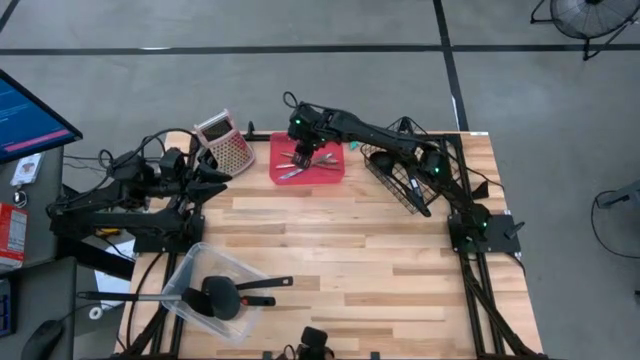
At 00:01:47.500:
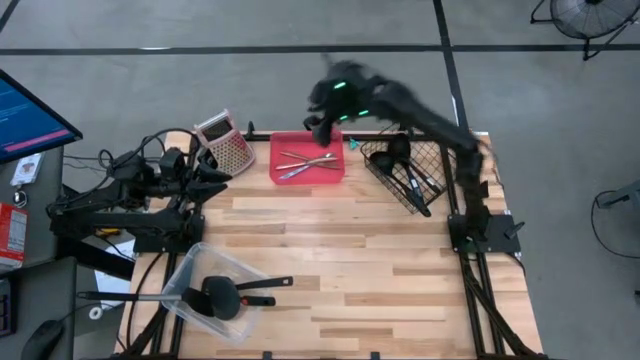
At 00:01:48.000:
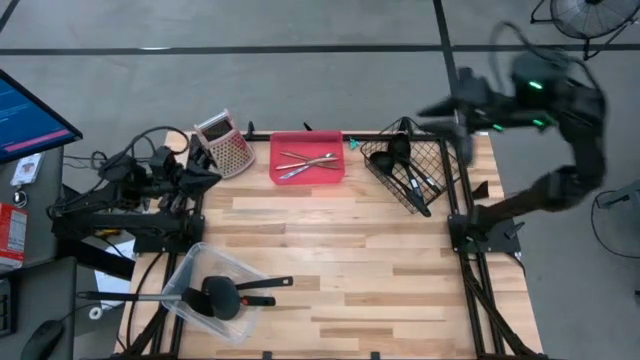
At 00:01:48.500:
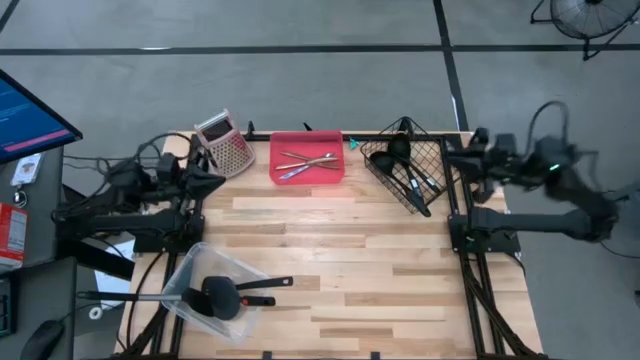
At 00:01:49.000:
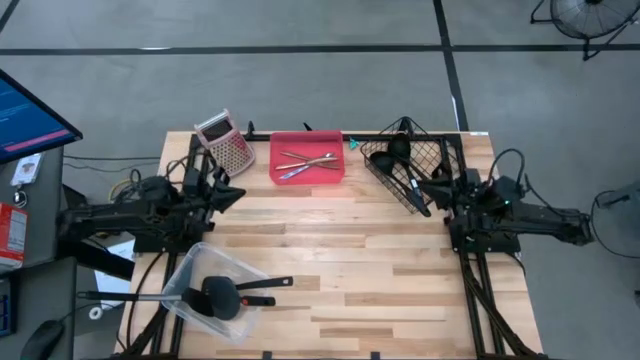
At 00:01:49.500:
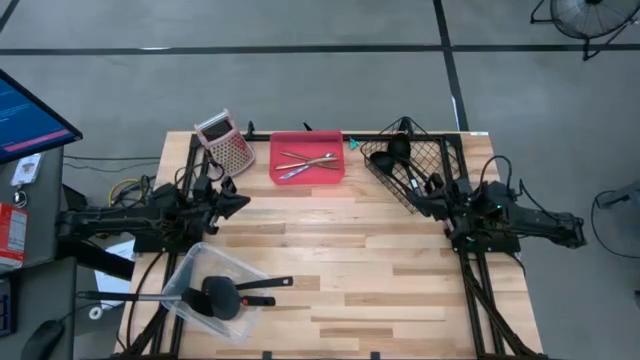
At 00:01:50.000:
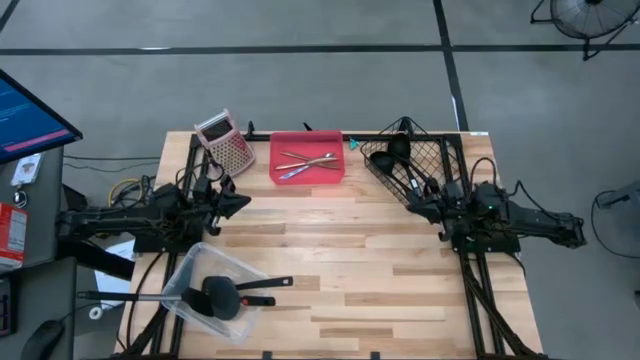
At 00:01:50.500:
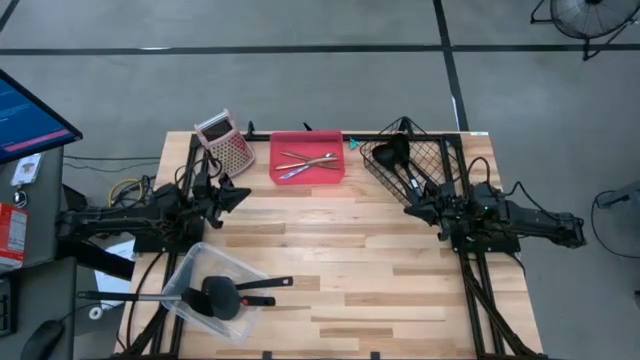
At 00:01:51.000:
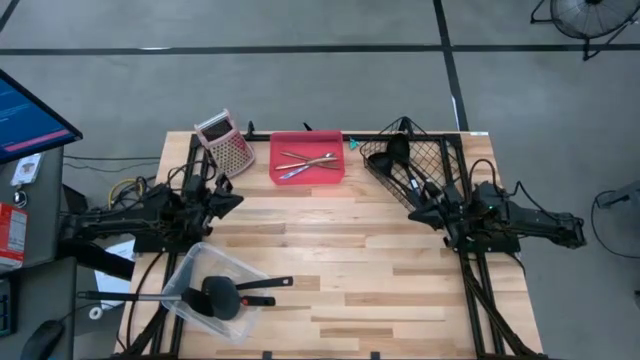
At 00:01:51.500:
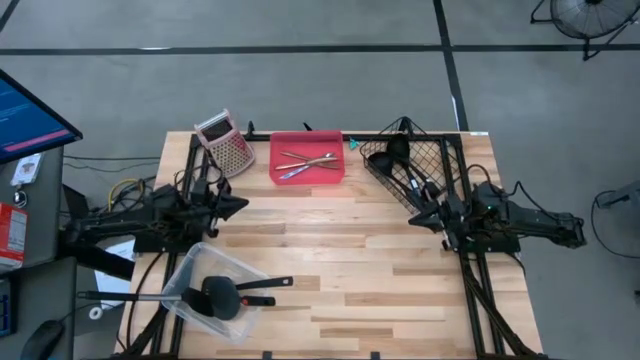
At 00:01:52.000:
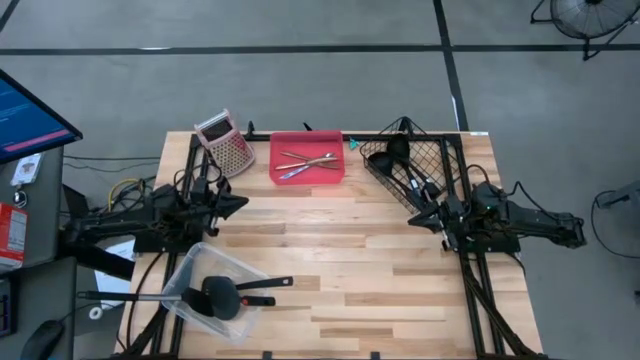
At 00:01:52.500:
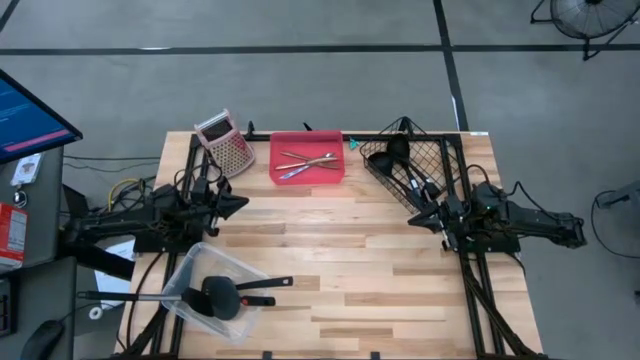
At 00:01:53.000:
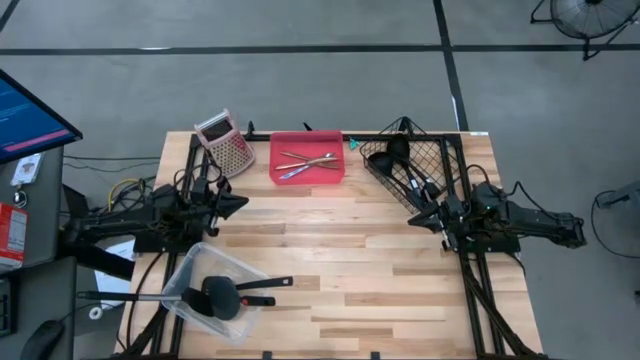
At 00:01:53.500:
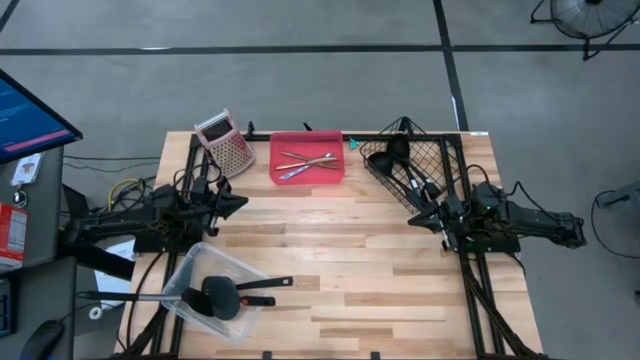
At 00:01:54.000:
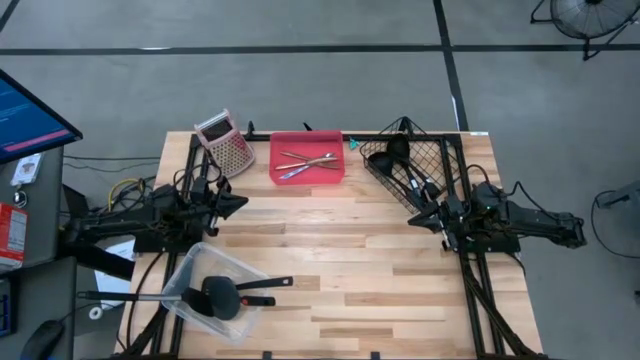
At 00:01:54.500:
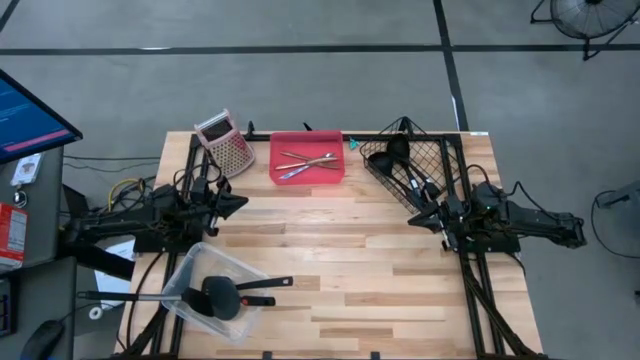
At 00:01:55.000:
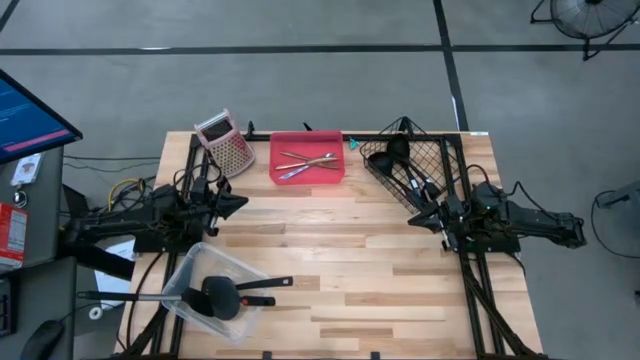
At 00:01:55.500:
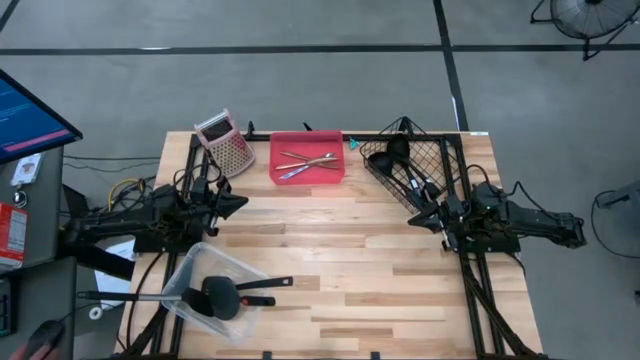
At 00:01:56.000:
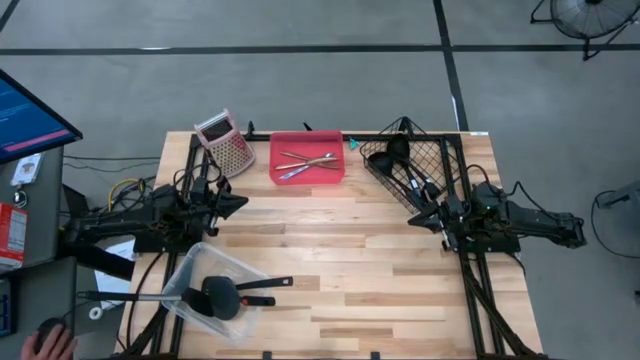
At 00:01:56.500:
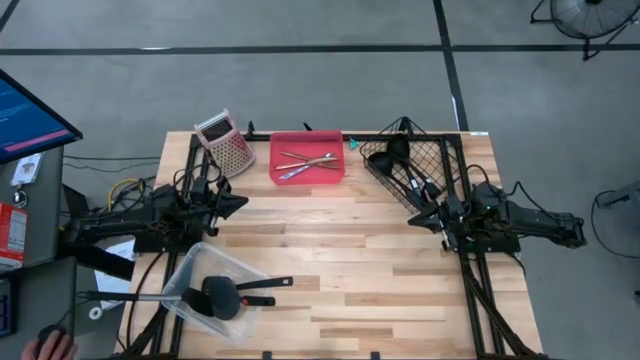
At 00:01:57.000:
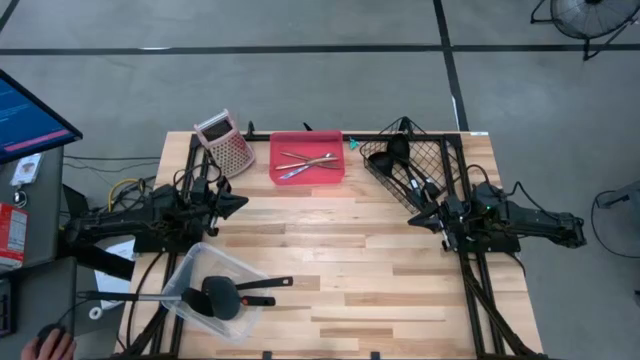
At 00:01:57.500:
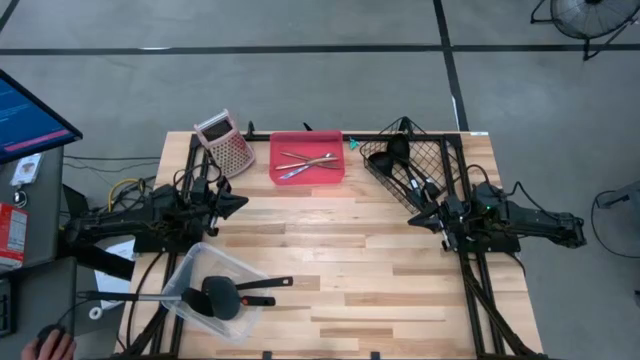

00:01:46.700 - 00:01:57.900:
Task: Pick & Place Kitchen Items
Return to Home Position

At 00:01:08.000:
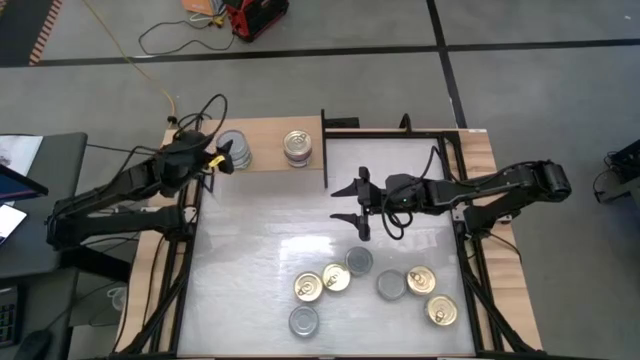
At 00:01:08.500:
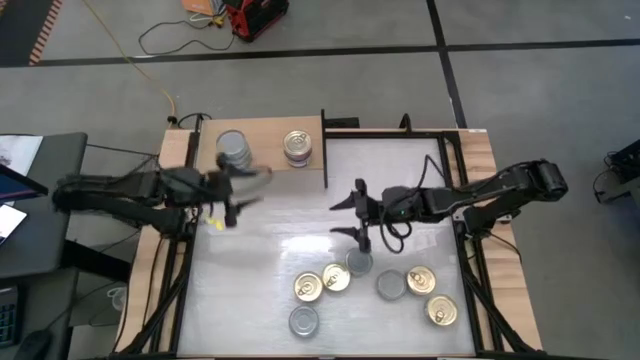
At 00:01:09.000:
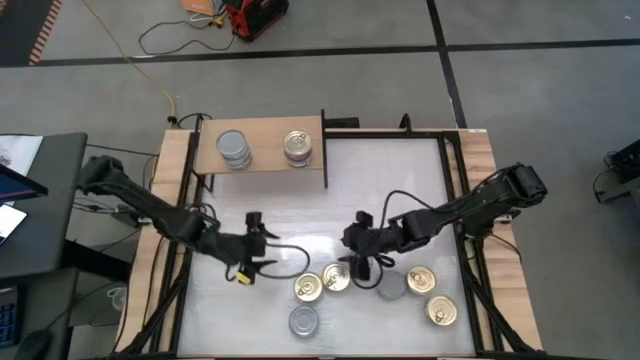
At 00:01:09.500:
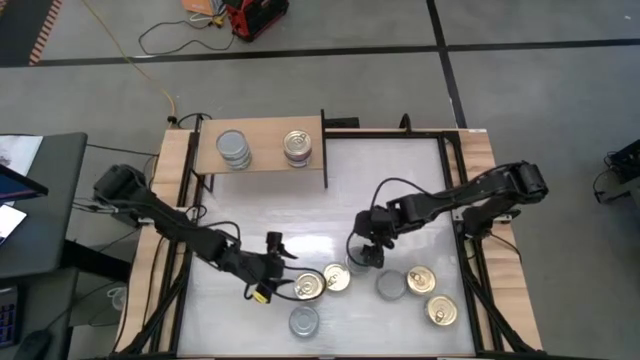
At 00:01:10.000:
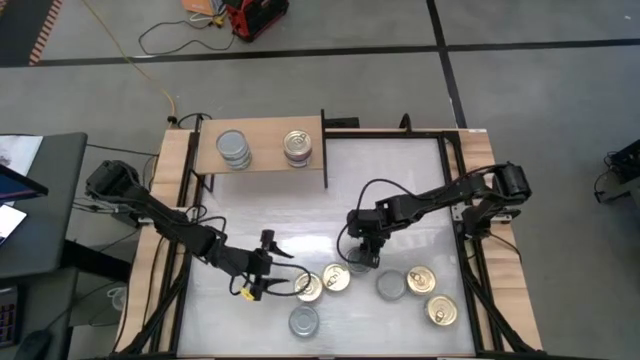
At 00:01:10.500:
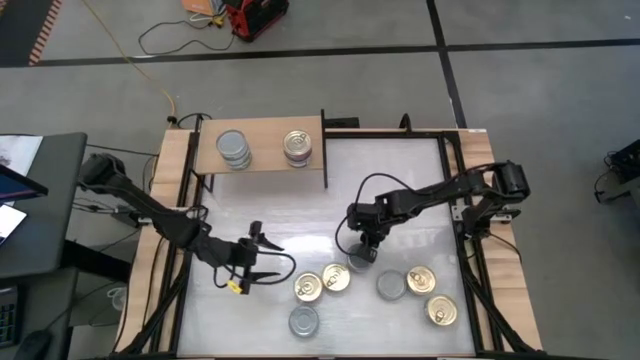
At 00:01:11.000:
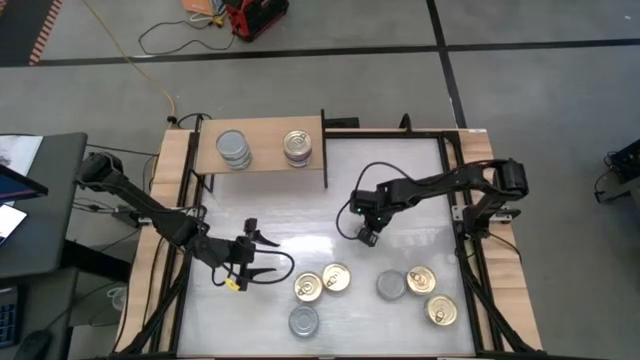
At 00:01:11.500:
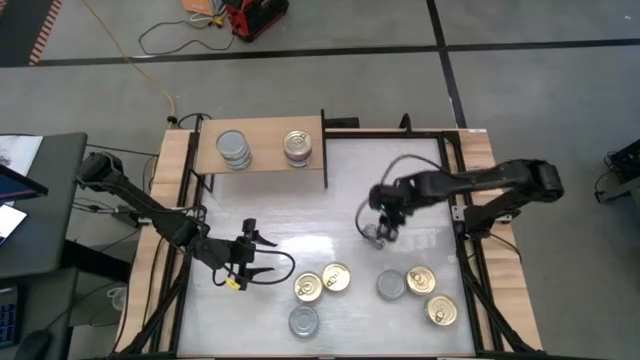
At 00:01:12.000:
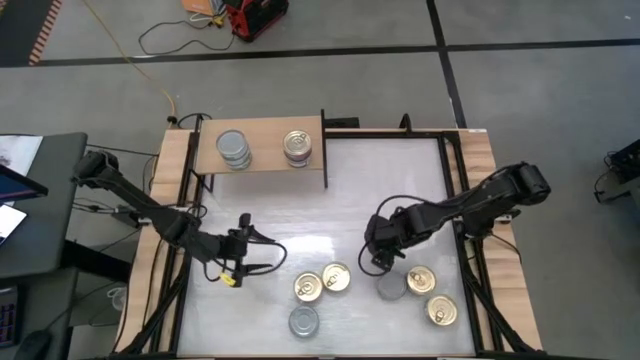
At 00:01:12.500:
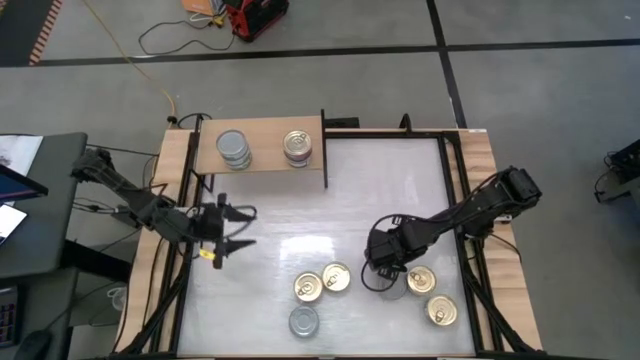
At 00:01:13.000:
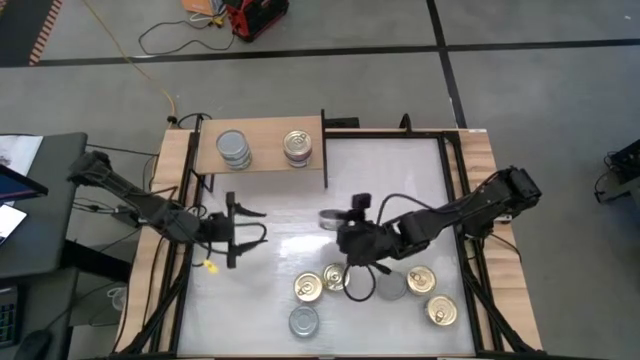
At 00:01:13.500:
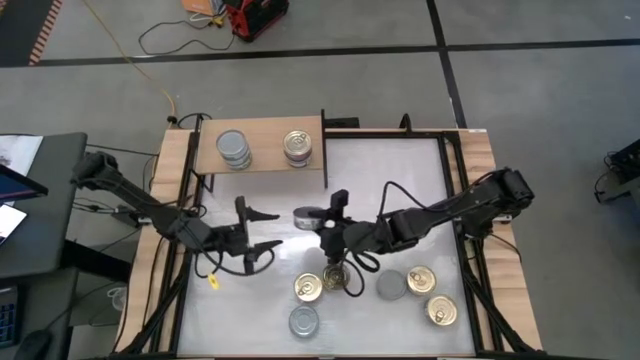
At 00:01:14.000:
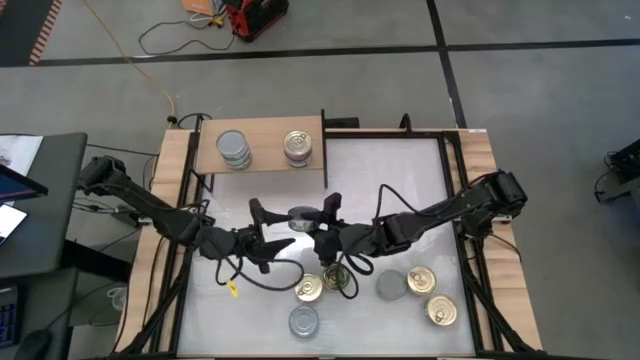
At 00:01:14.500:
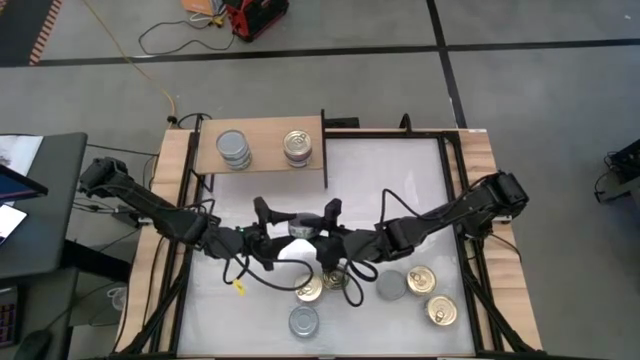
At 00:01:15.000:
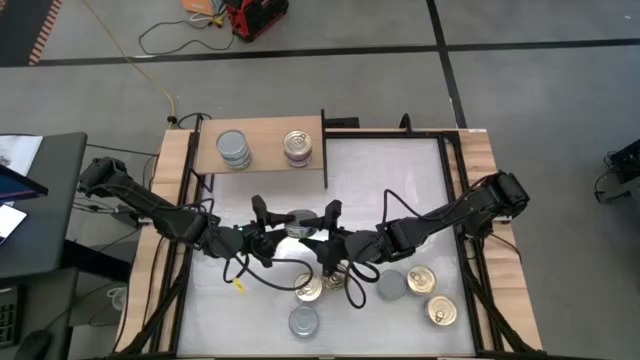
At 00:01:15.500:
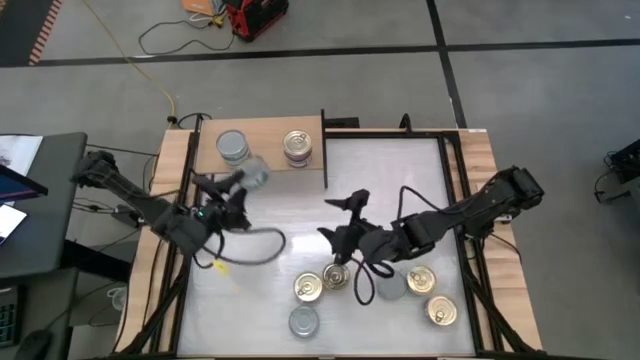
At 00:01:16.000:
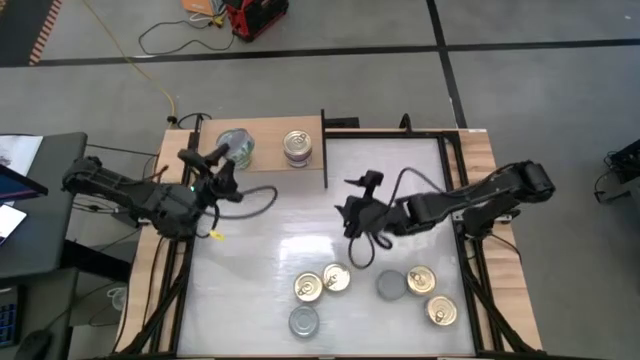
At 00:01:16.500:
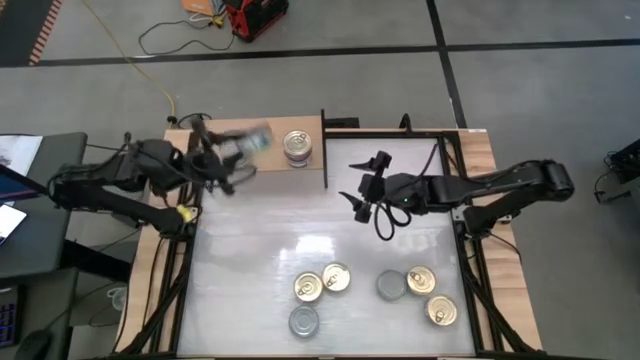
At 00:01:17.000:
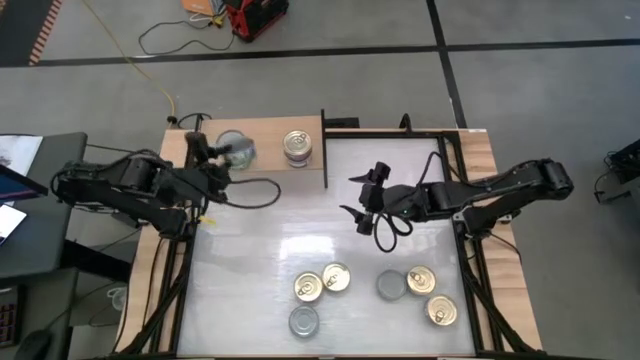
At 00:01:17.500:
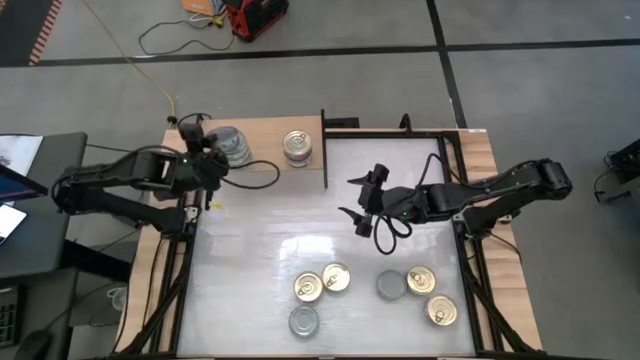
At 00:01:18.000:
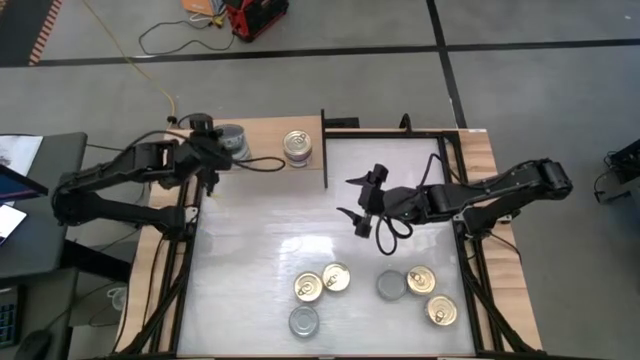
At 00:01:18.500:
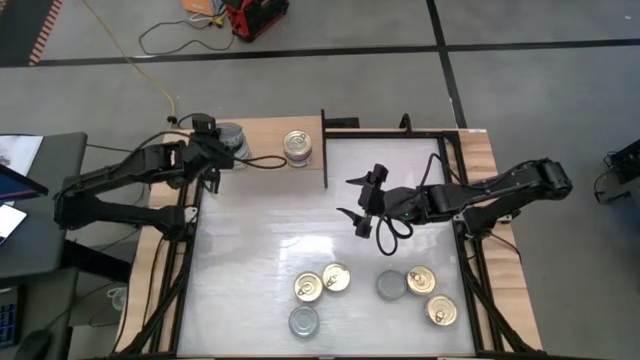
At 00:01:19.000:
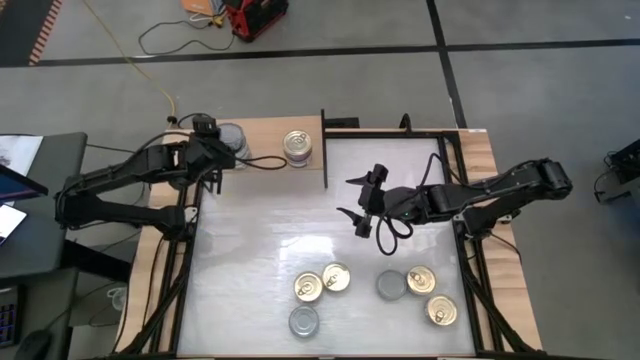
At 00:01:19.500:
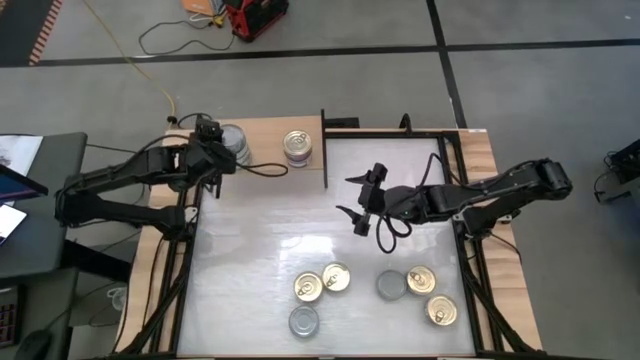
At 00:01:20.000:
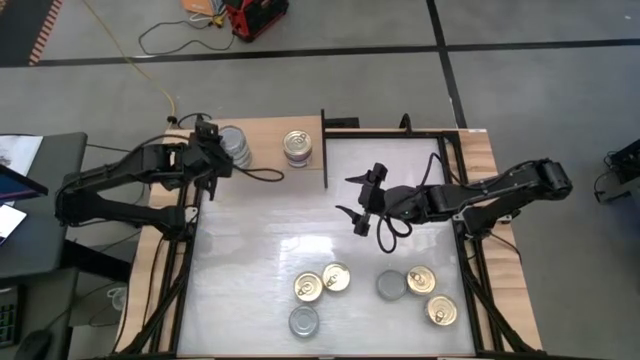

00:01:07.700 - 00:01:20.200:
Task: Stack canned seafood by type on shelf
Stack the green-white tuna can on top of the other green-white tuna cans on the shelf
